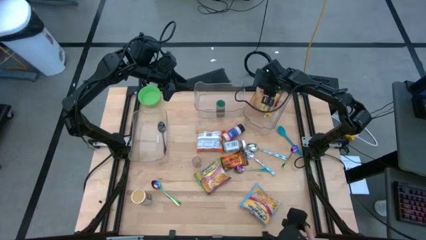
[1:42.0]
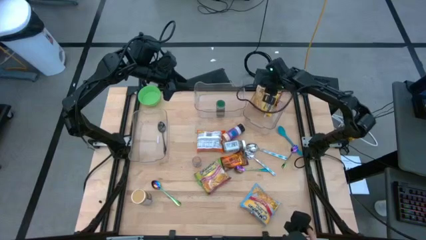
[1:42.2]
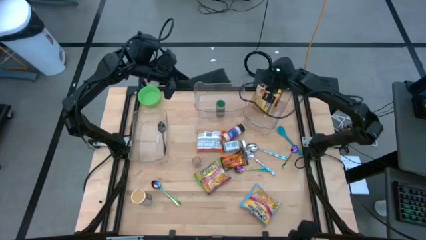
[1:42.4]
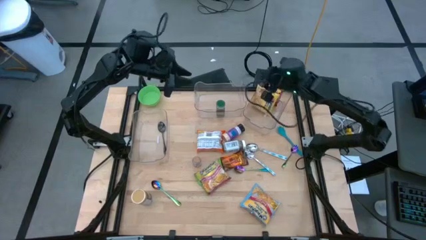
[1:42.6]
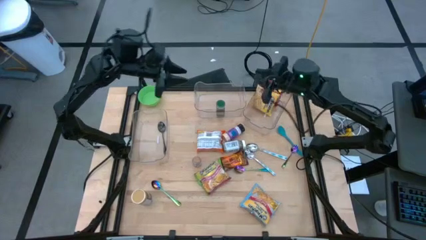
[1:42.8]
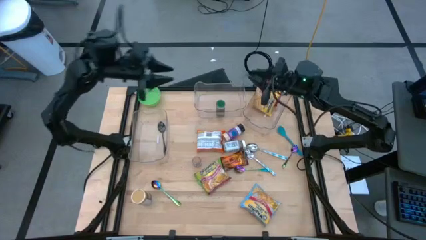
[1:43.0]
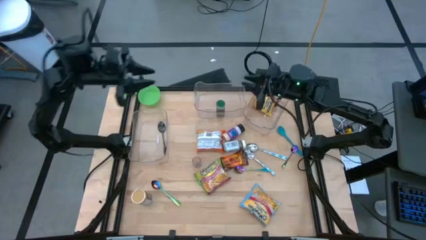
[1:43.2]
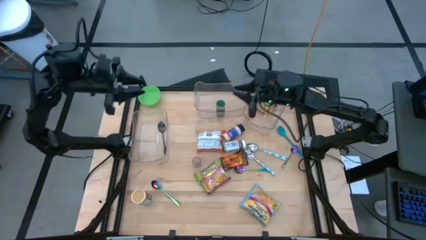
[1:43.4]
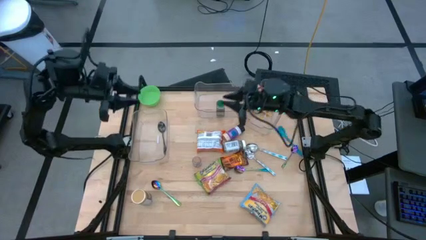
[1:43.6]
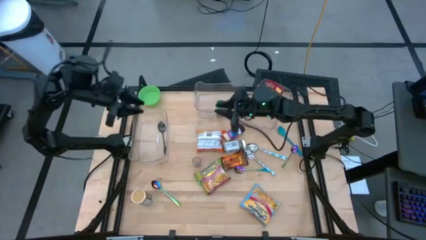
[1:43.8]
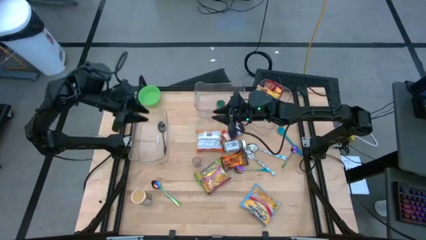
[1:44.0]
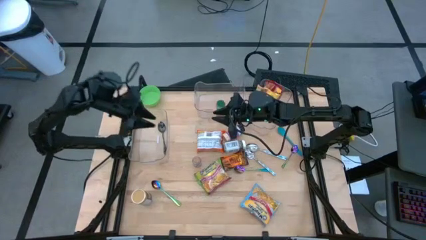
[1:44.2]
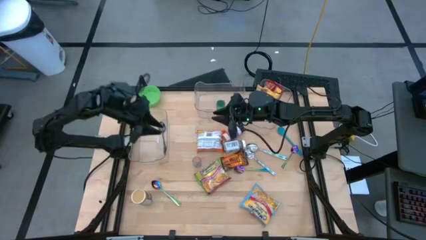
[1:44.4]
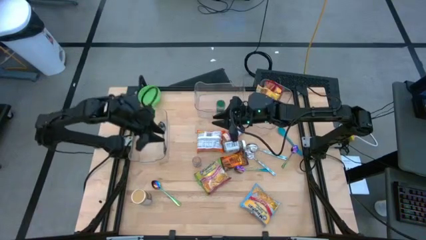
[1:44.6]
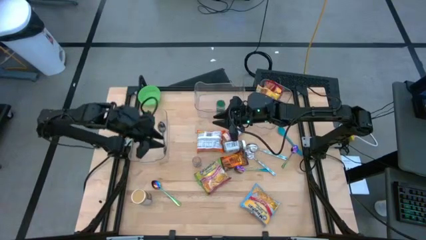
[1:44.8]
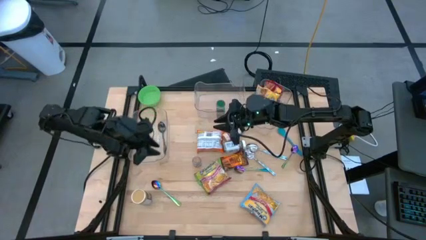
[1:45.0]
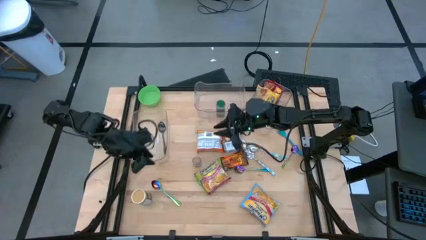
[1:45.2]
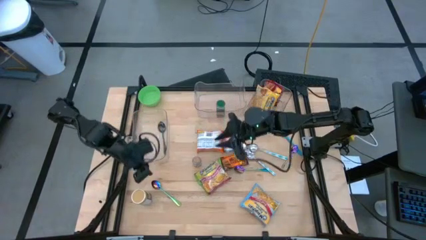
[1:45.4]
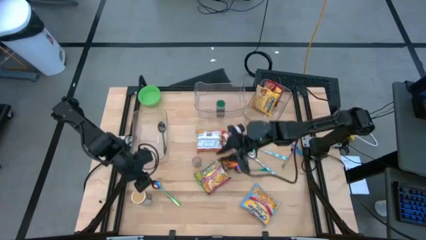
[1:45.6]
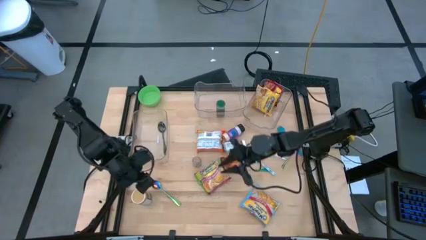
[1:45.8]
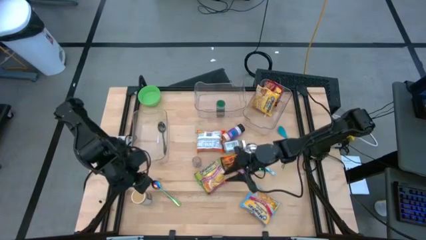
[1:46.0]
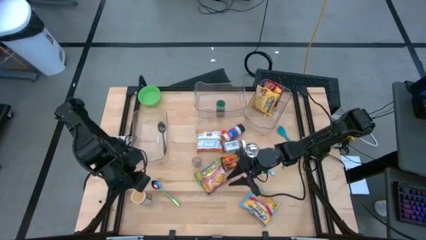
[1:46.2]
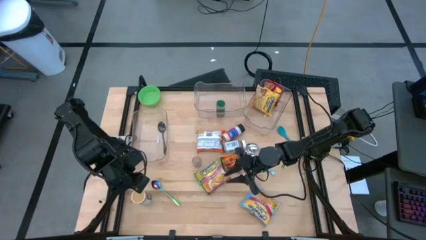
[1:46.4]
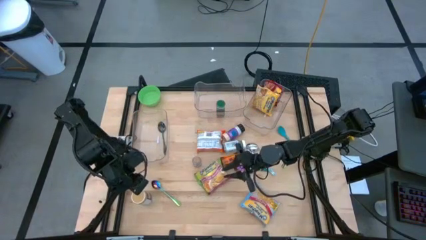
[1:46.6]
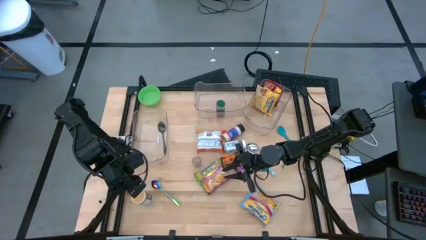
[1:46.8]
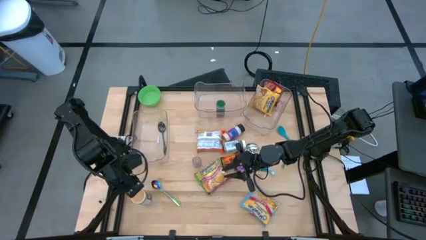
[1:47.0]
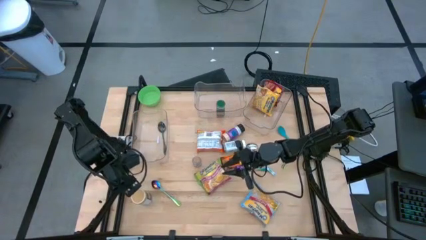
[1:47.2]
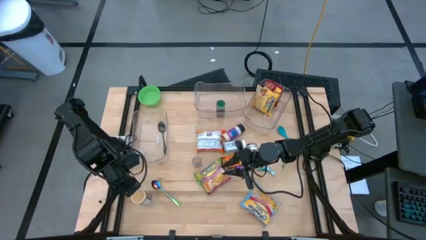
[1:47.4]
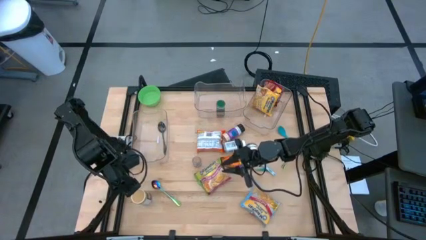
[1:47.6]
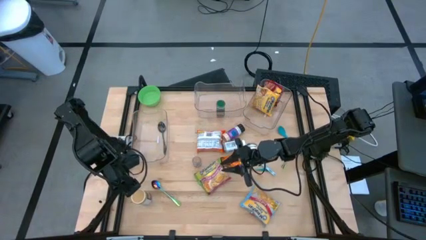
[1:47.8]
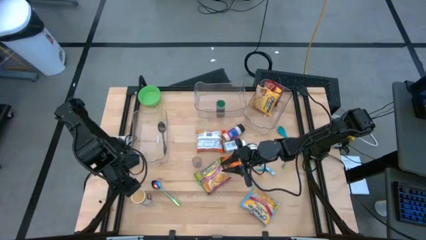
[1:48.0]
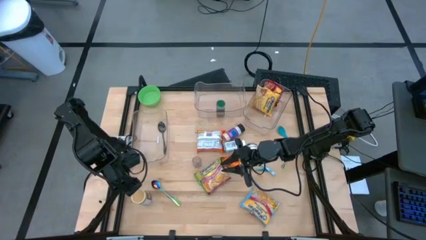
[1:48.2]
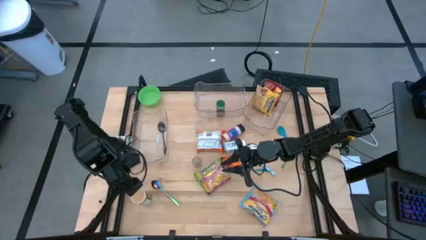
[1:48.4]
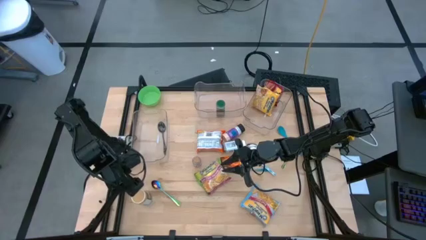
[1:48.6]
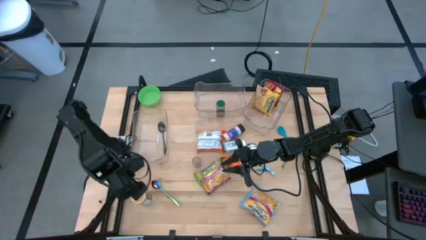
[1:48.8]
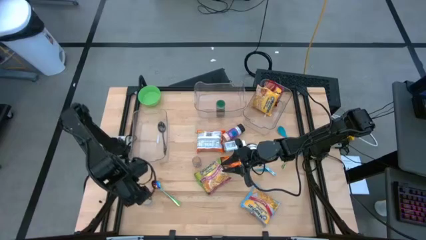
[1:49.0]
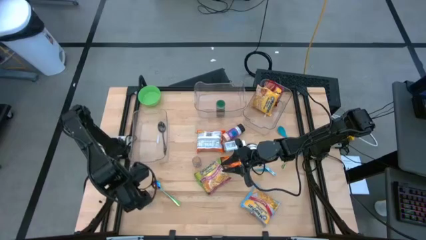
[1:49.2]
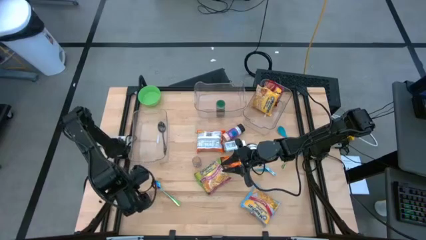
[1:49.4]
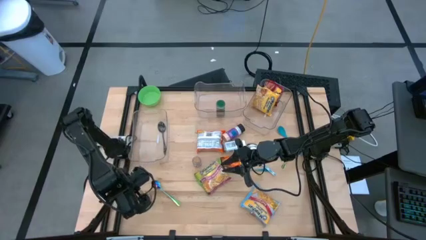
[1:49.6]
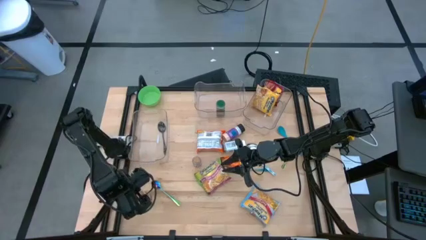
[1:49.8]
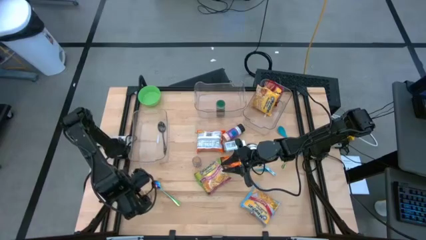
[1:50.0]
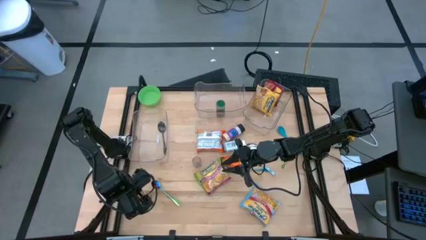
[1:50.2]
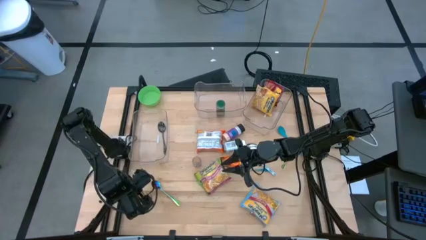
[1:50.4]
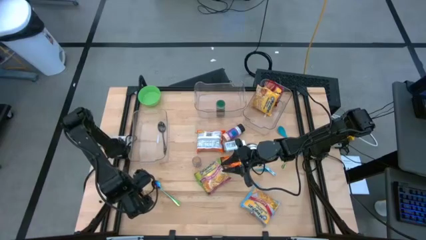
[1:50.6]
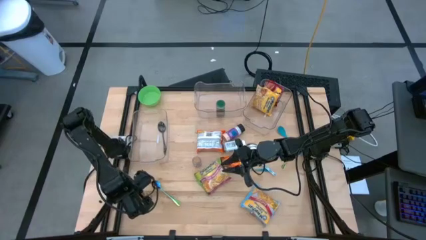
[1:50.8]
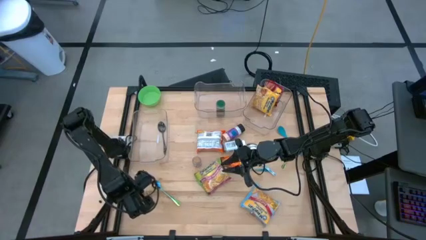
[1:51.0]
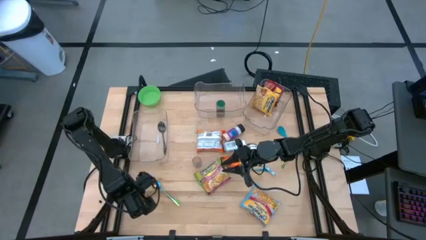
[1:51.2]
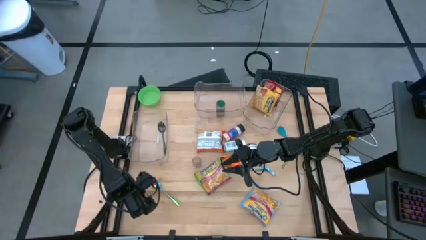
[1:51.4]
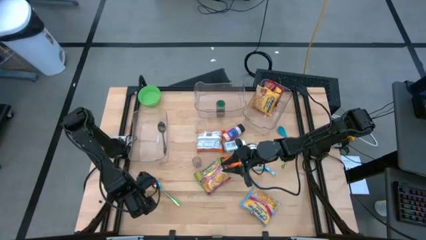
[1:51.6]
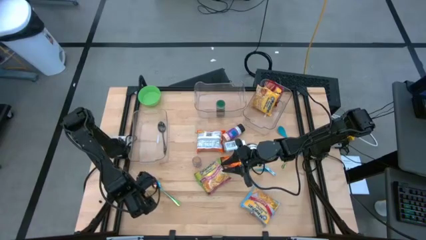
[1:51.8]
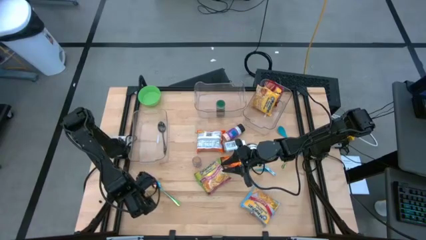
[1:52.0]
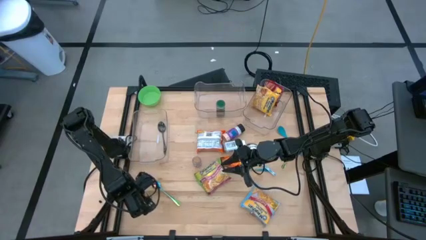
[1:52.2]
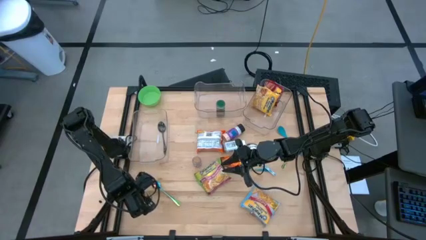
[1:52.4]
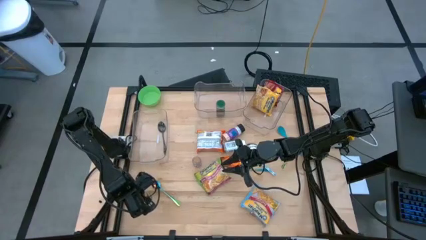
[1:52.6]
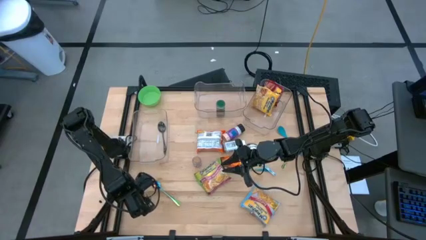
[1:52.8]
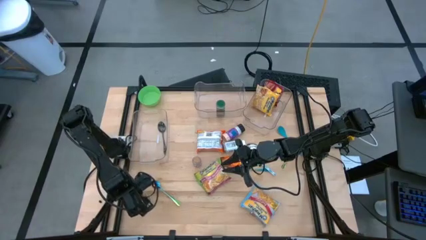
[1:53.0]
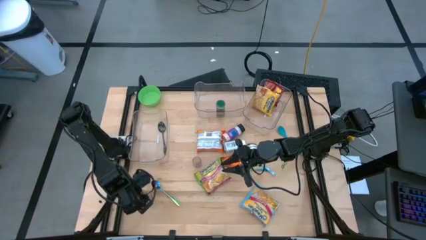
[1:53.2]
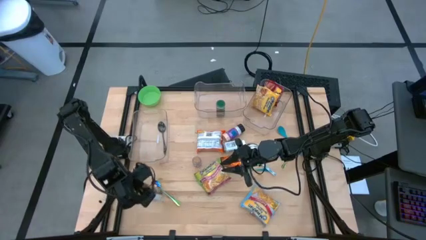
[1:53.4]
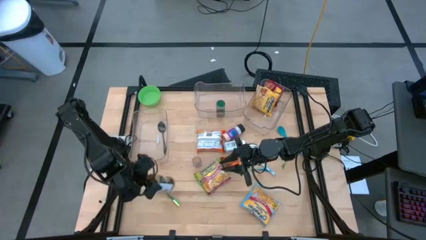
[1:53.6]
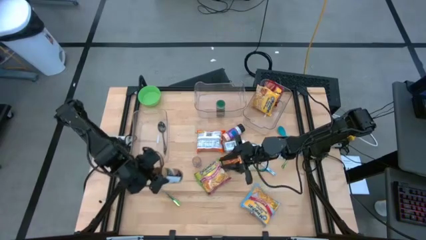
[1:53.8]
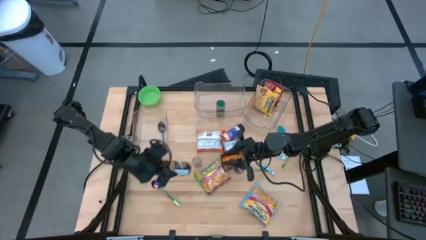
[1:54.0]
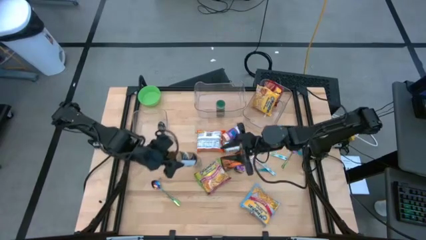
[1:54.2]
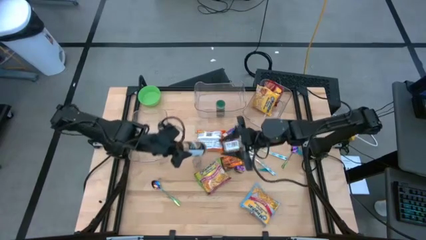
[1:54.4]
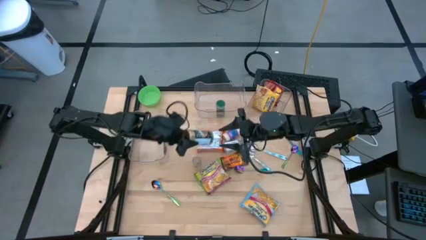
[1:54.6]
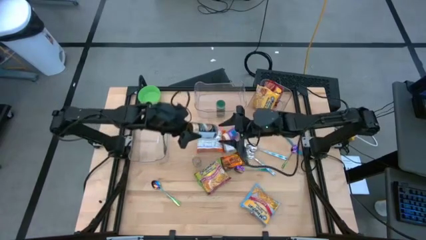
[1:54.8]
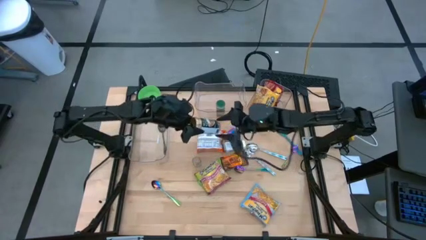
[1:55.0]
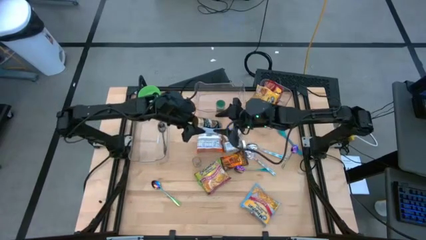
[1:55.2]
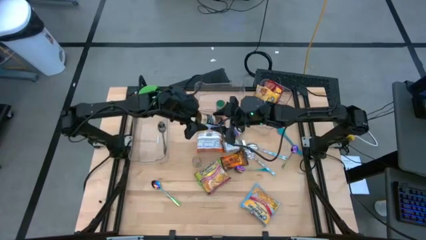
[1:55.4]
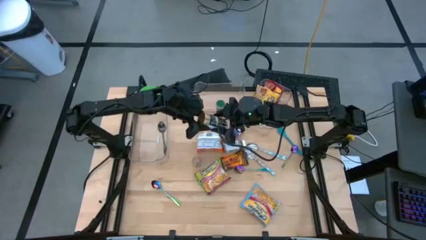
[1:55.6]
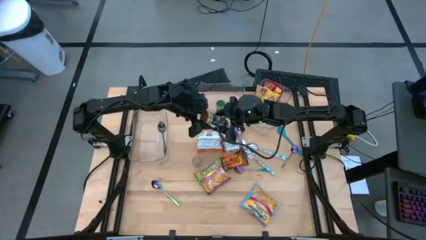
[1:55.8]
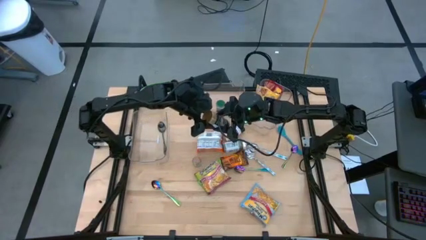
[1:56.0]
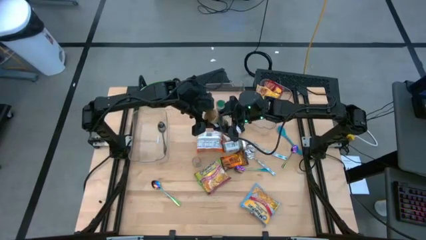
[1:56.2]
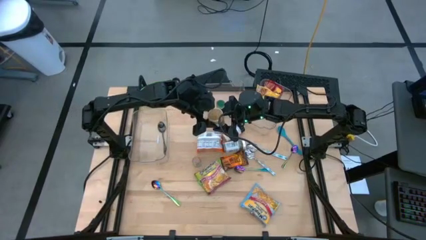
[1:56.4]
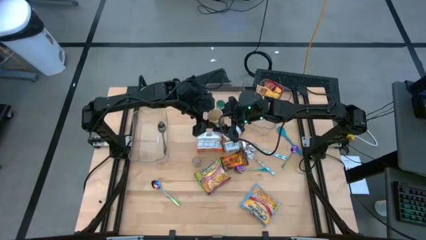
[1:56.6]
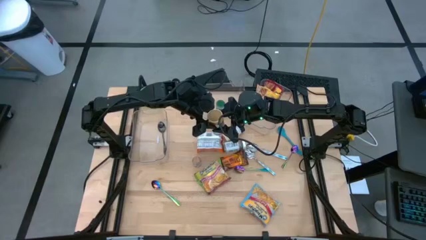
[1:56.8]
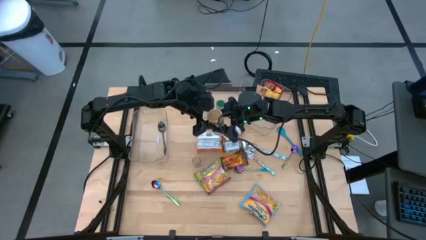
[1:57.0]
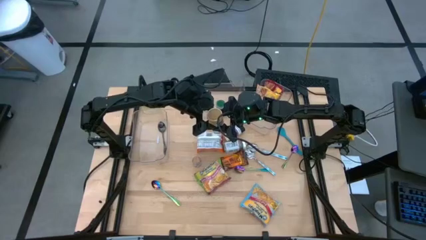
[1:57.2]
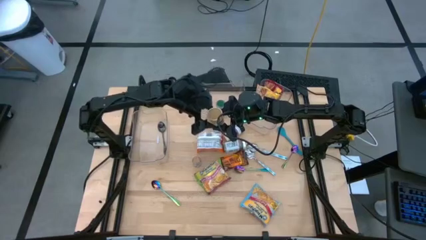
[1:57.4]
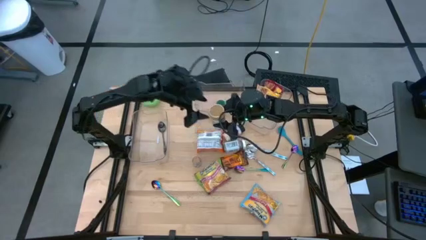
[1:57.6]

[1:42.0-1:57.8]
Task: Pick & Place Food Item
Put the gold spice bottle into the middle transparent bin
